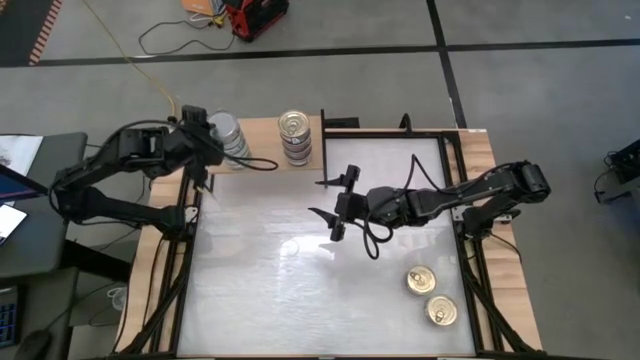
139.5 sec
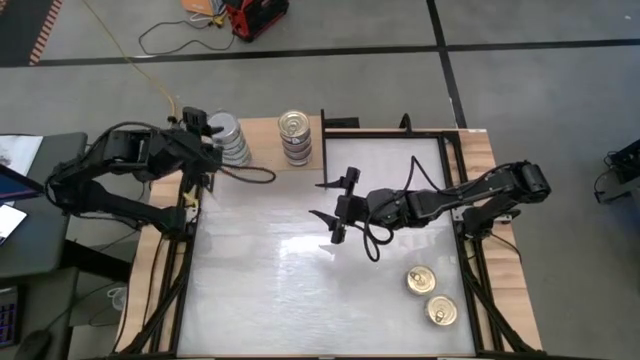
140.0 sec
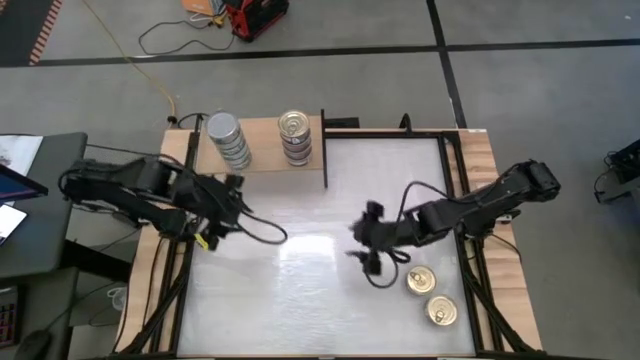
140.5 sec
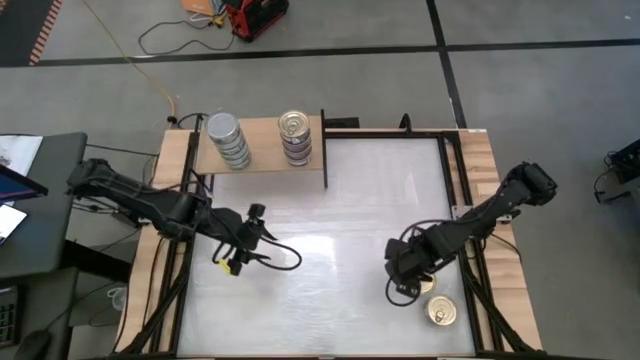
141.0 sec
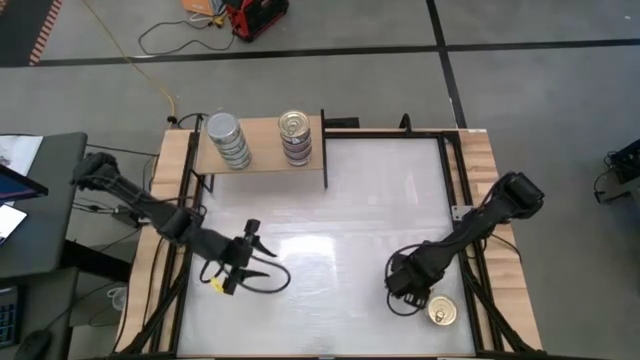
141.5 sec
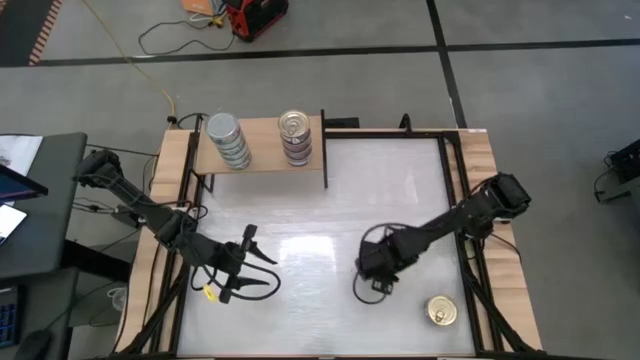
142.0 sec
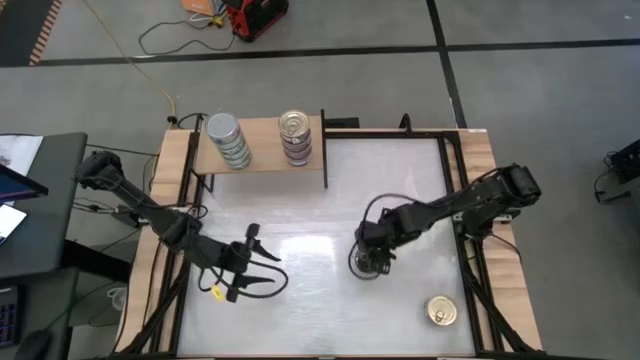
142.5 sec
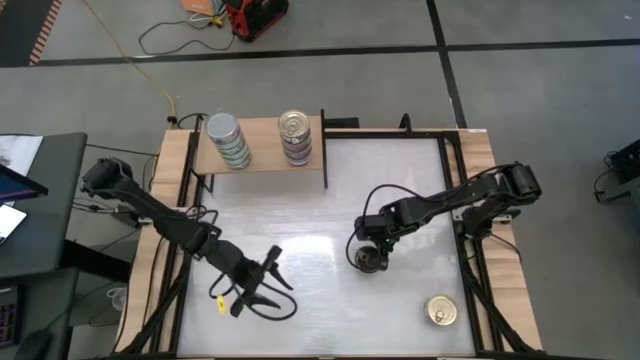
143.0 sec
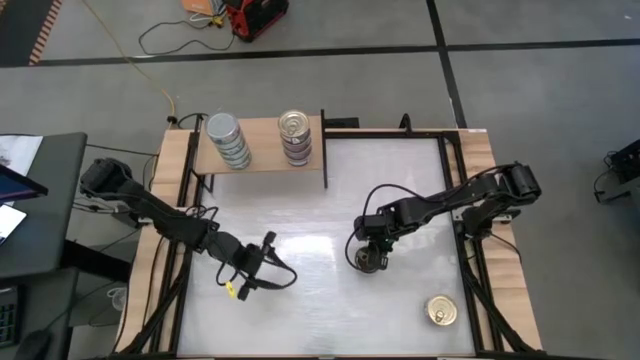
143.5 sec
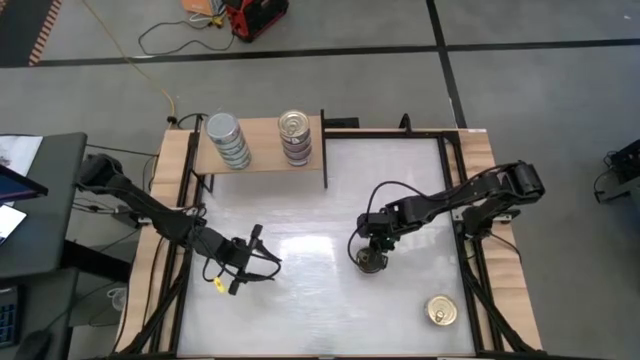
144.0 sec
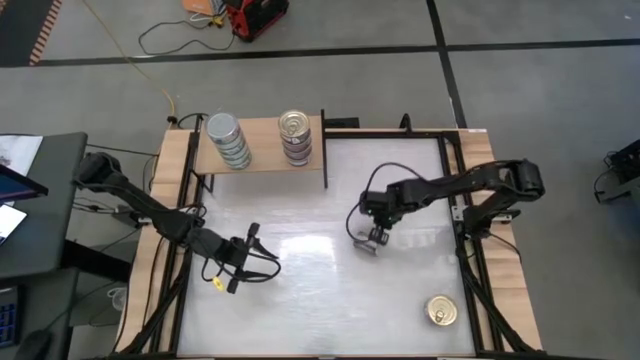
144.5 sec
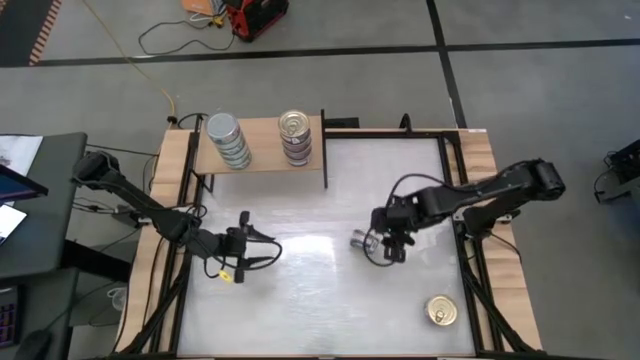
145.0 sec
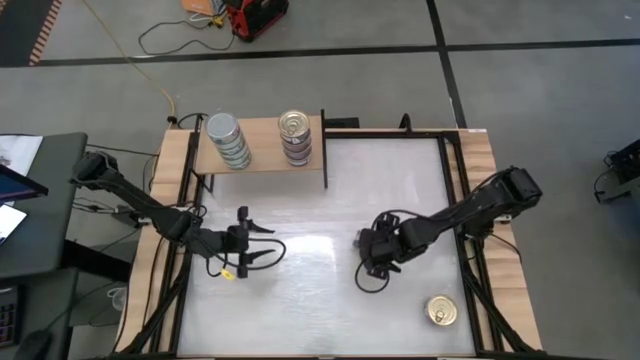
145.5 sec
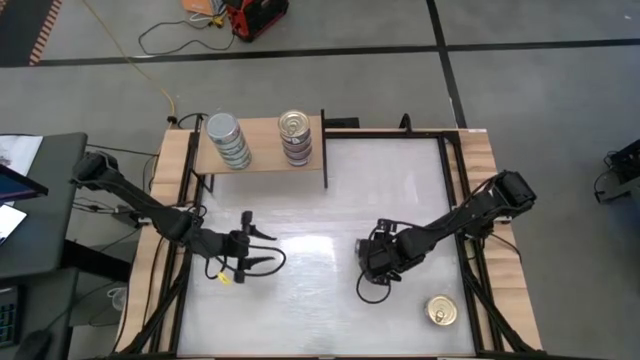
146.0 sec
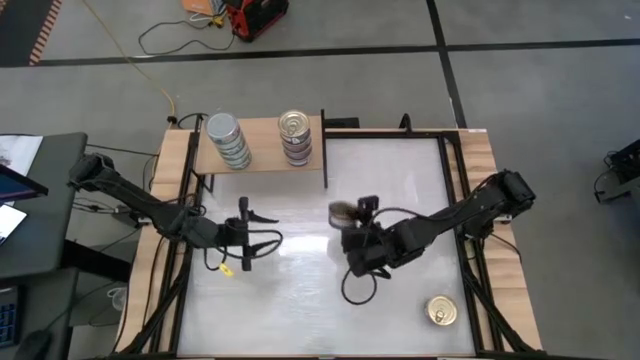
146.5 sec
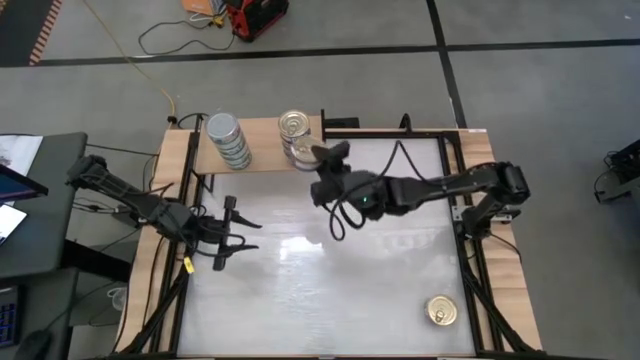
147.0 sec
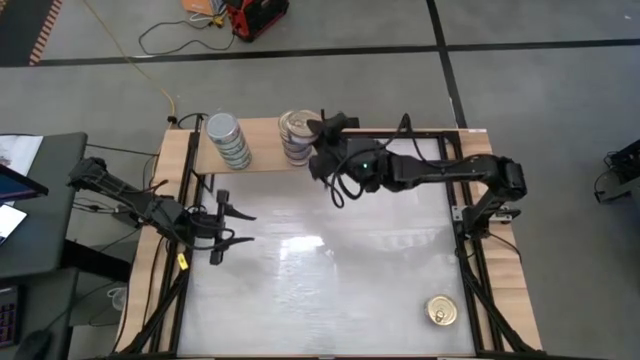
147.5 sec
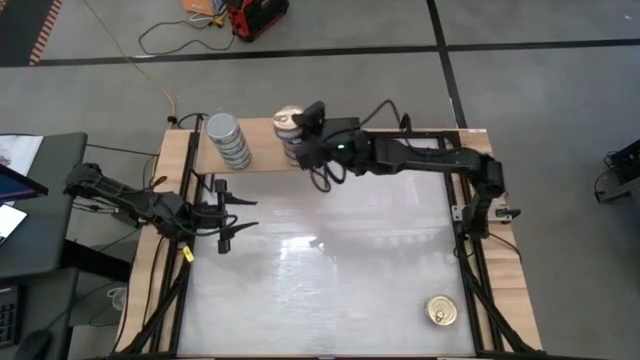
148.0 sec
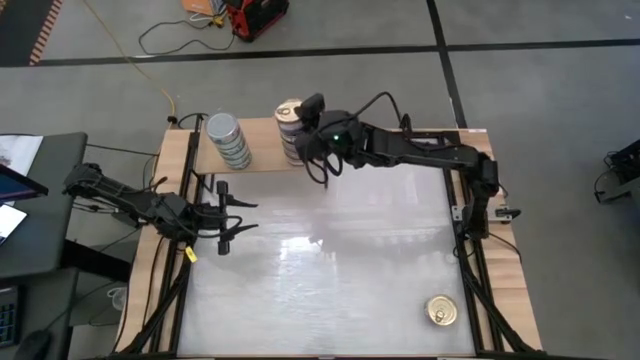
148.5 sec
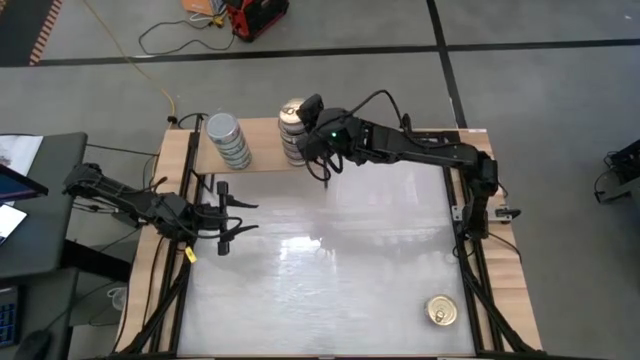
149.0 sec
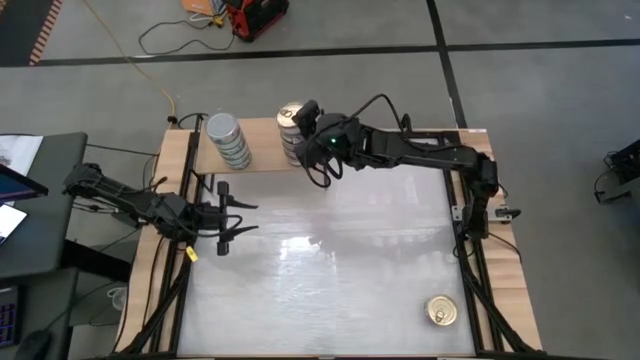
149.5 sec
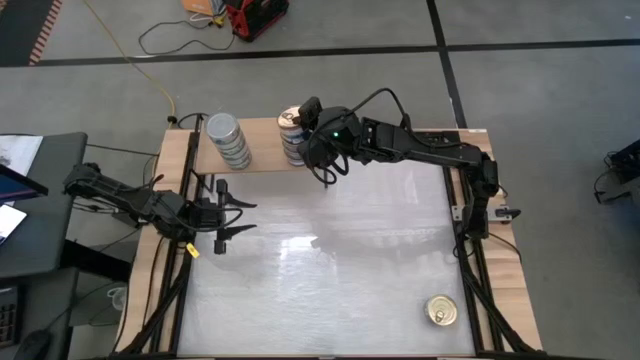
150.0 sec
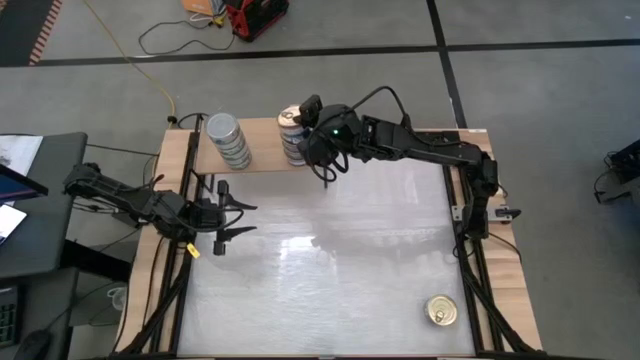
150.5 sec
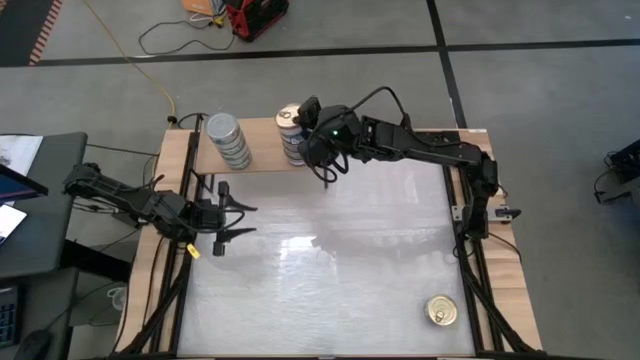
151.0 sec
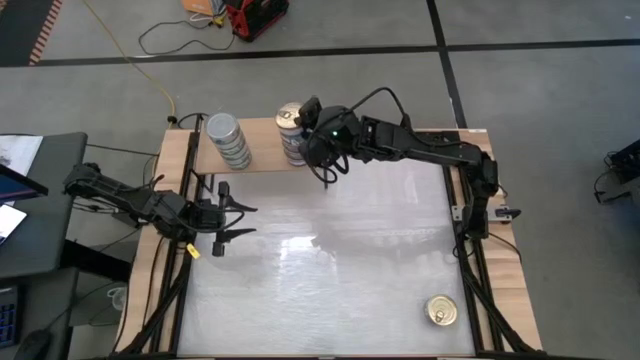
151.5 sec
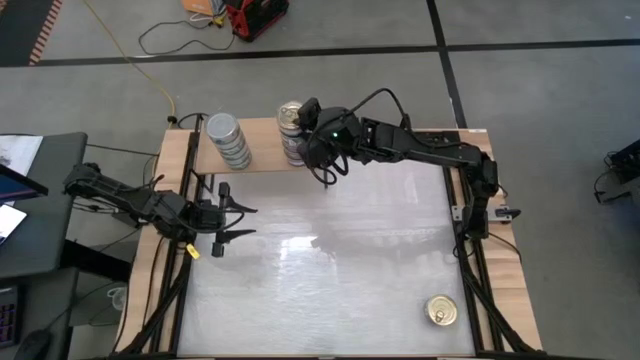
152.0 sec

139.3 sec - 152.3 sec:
Task: Stack canned seafood by type on shelf
Stack the blue-pink tuna can on top of the other blue-pink tuna cans on the shelf

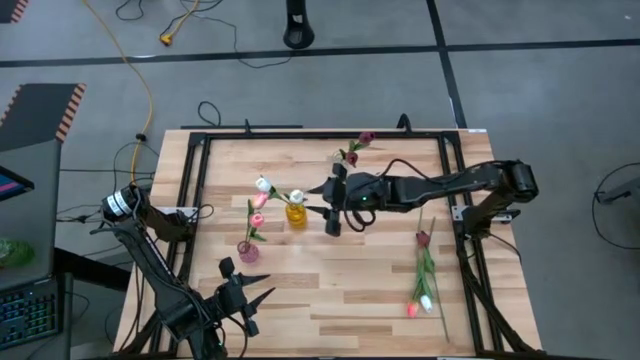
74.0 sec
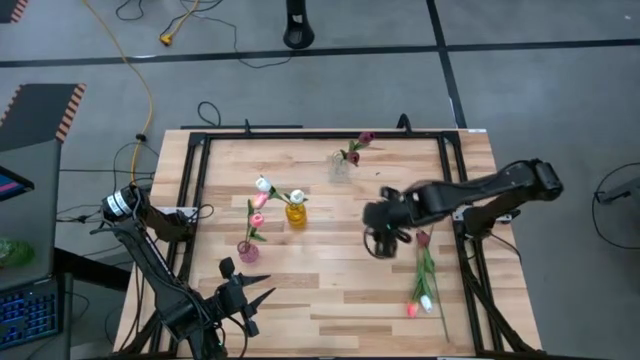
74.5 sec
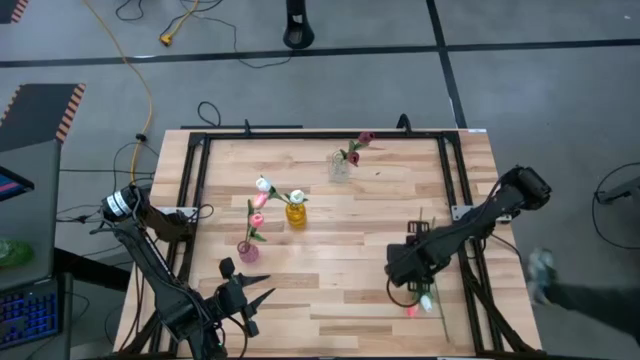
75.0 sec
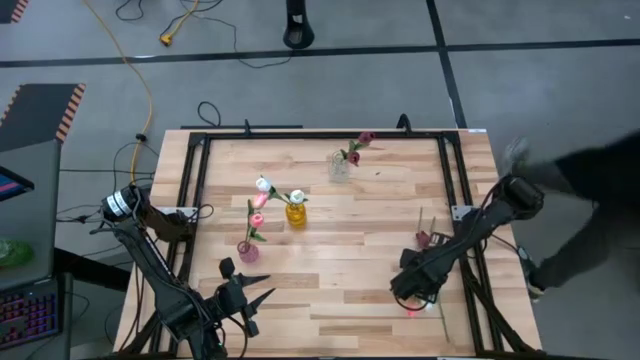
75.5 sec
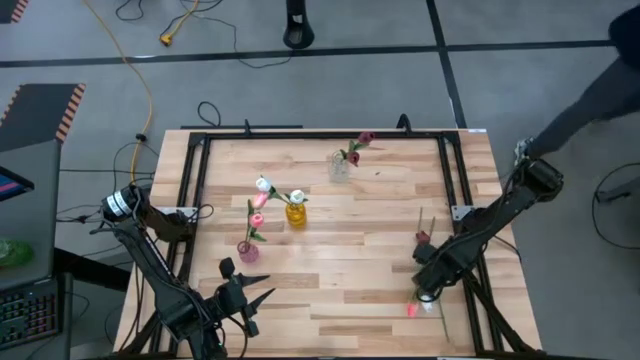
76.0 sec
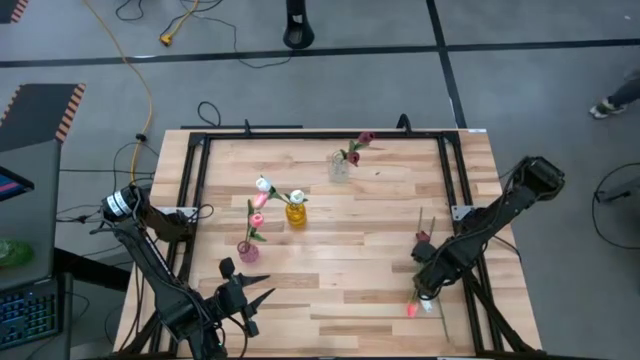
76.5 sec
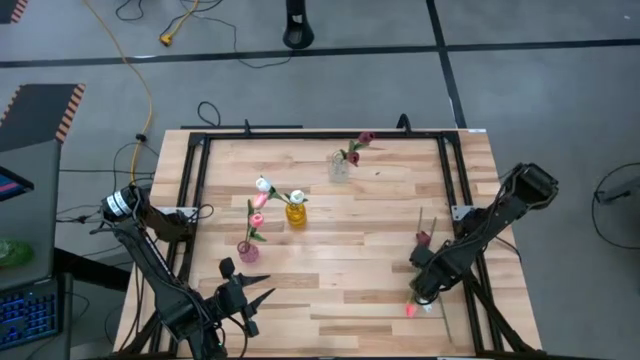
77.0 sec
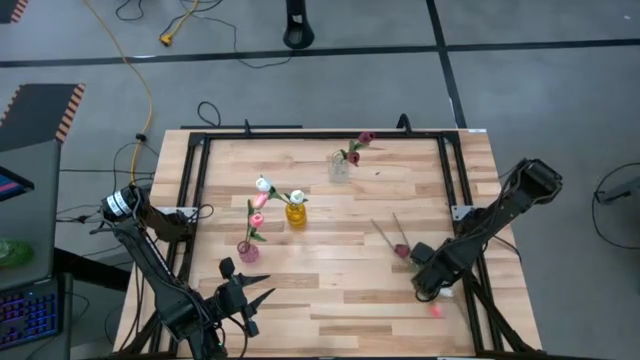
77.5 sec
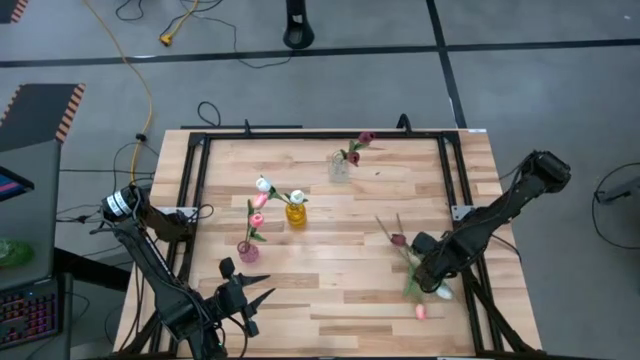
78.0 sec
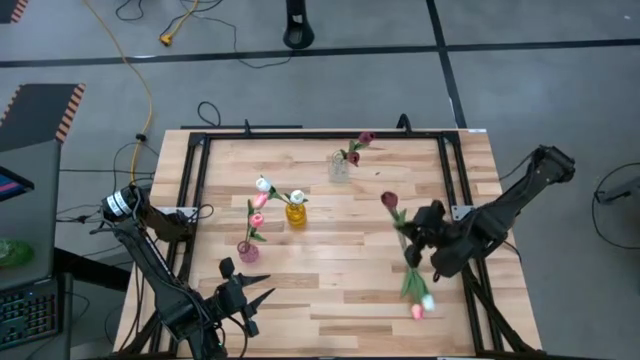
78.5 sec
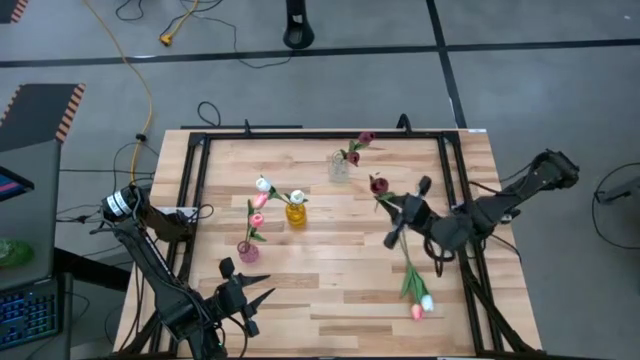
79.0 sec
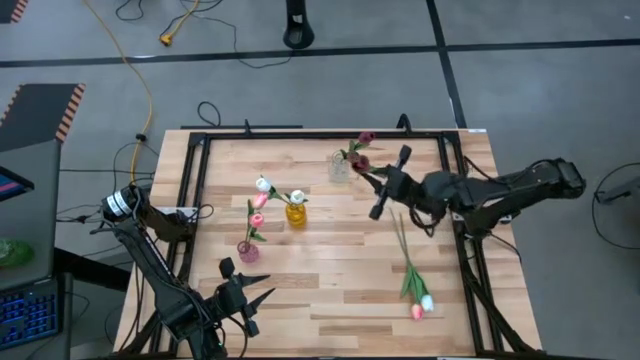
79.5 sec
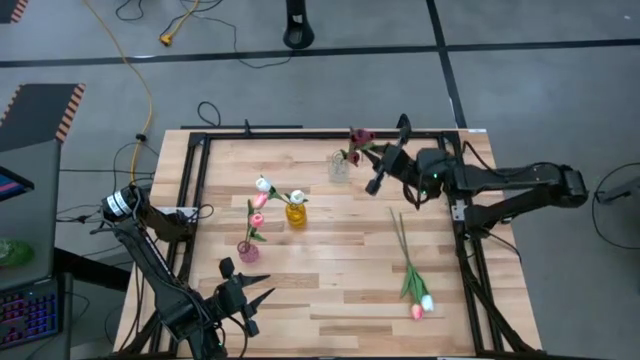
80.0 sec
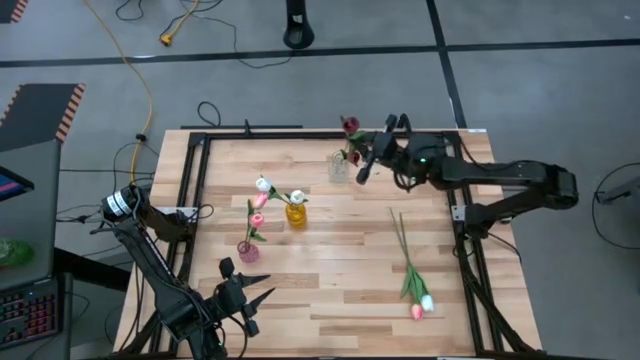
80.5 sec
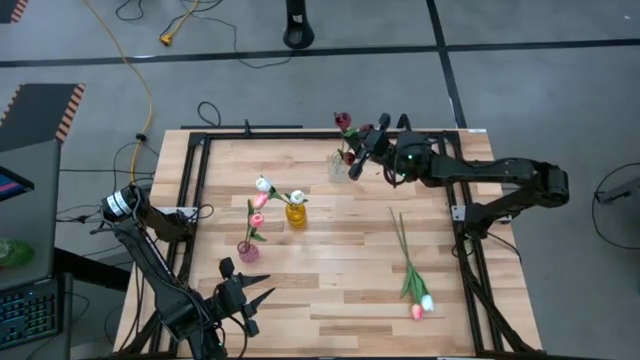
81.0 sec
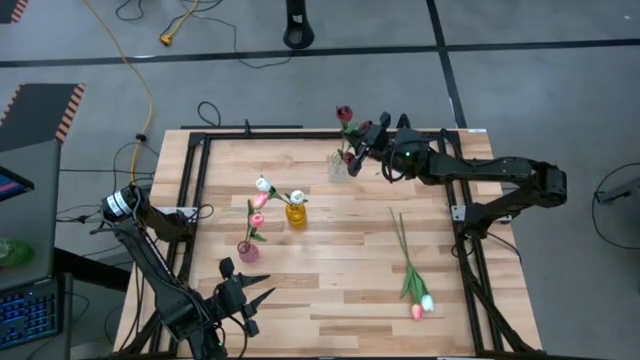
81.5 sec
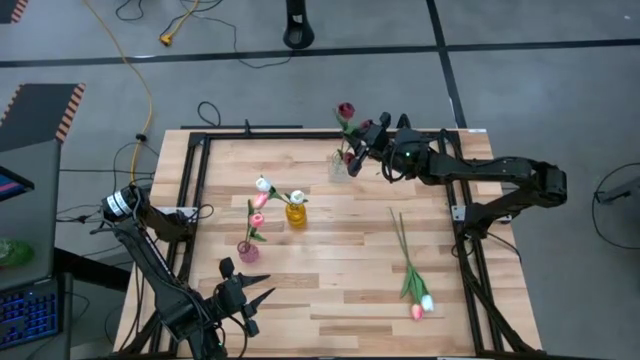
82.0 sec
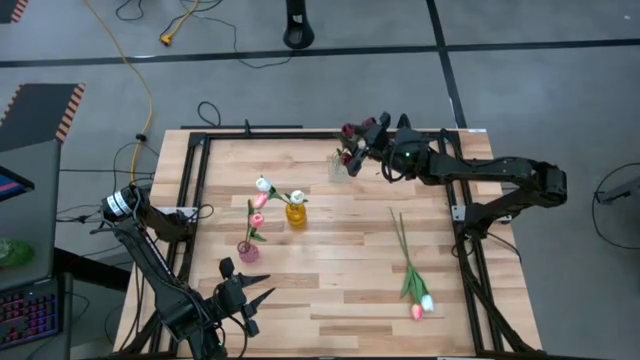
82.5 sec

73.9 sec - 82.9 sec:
Task: Sort flowers into vase by color
Put the red flower into the transparent vase
